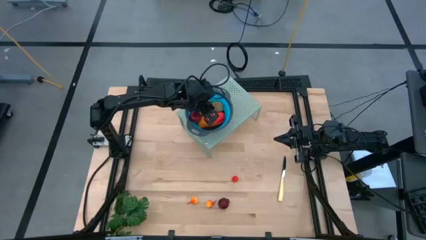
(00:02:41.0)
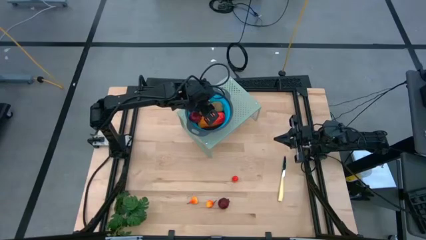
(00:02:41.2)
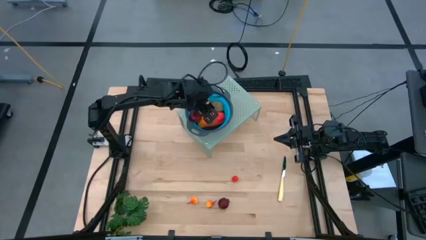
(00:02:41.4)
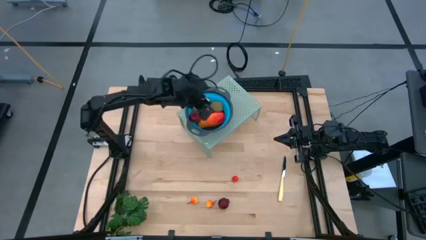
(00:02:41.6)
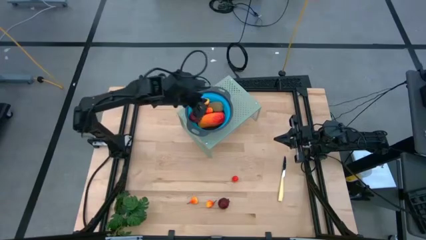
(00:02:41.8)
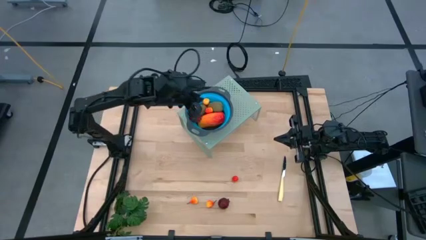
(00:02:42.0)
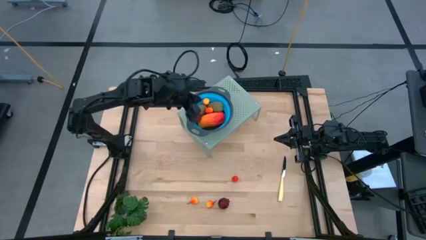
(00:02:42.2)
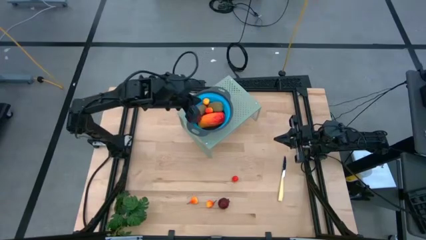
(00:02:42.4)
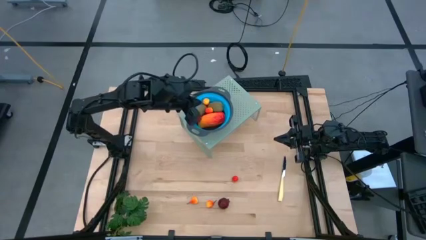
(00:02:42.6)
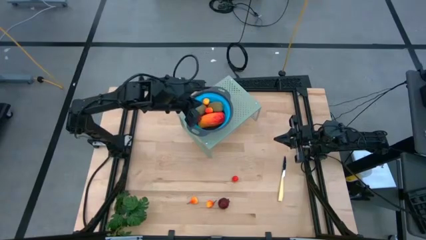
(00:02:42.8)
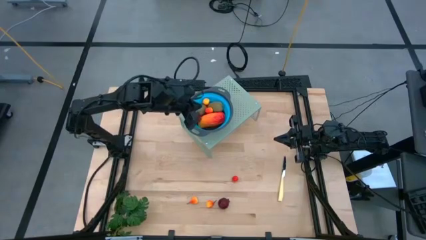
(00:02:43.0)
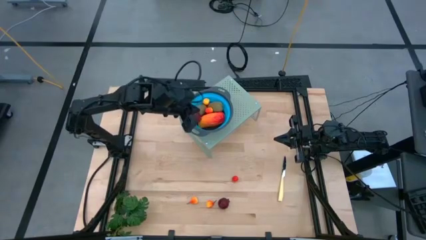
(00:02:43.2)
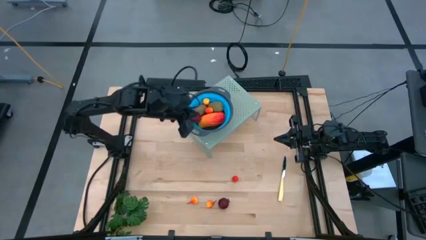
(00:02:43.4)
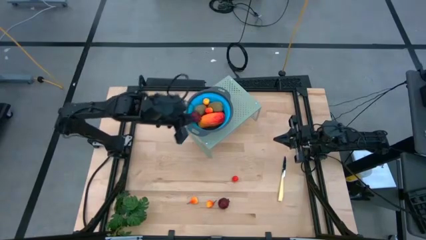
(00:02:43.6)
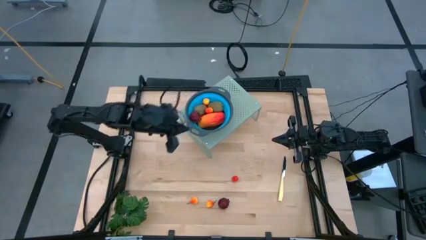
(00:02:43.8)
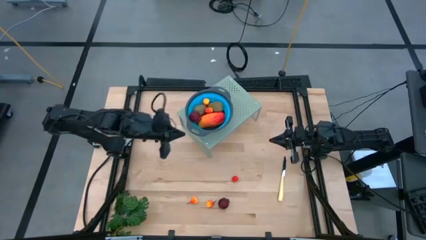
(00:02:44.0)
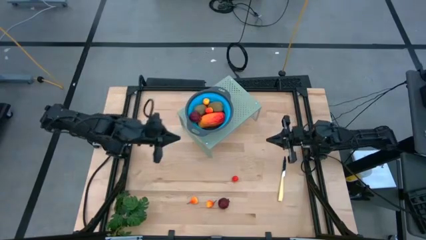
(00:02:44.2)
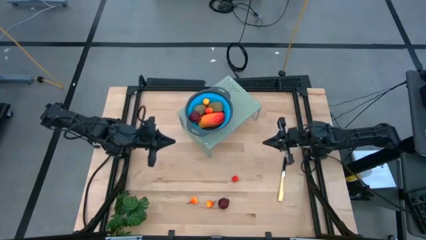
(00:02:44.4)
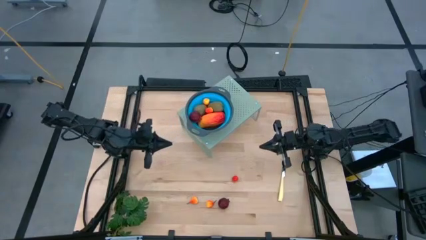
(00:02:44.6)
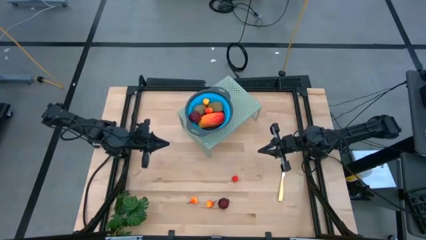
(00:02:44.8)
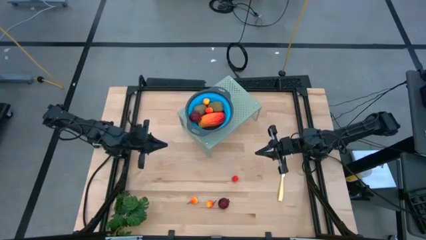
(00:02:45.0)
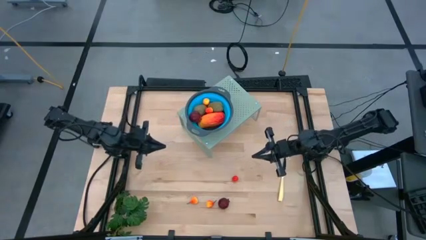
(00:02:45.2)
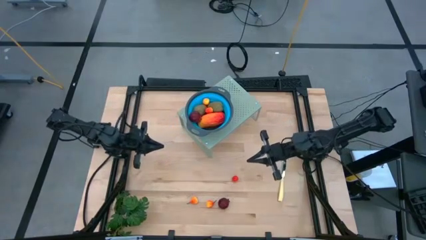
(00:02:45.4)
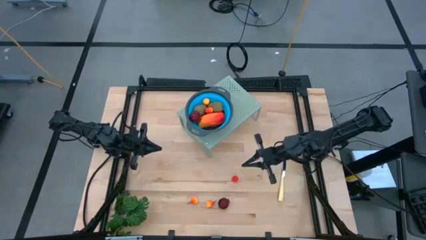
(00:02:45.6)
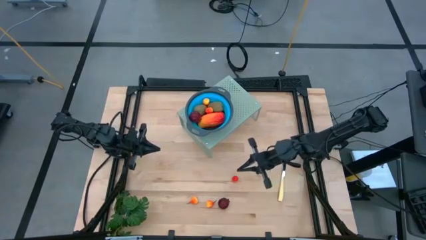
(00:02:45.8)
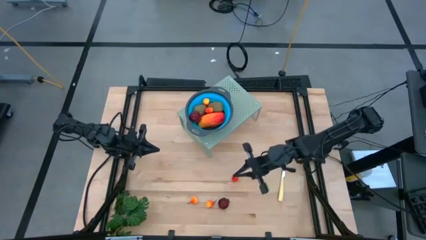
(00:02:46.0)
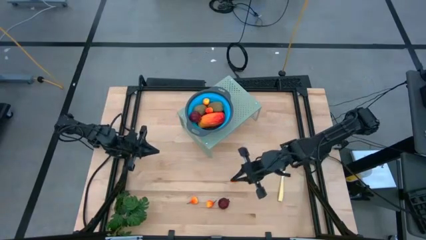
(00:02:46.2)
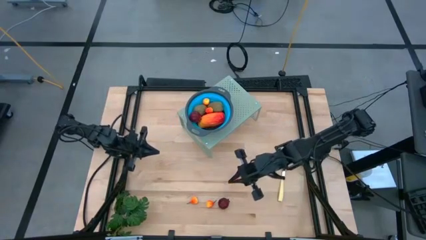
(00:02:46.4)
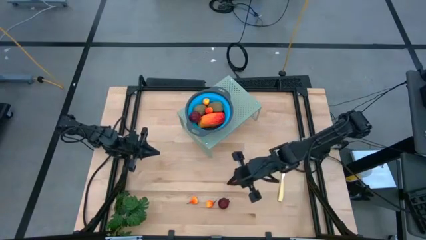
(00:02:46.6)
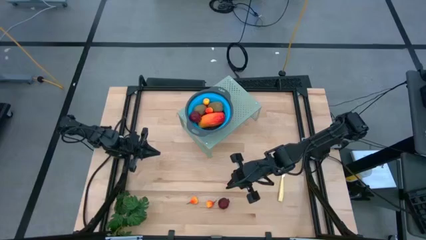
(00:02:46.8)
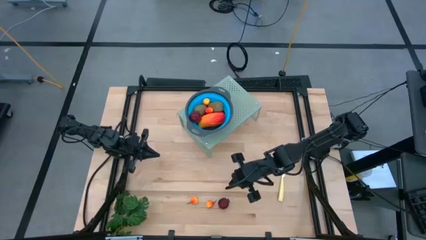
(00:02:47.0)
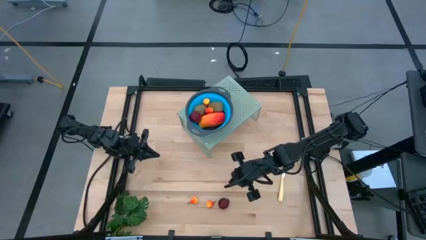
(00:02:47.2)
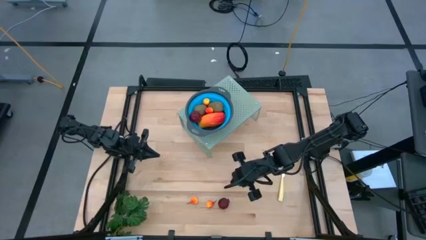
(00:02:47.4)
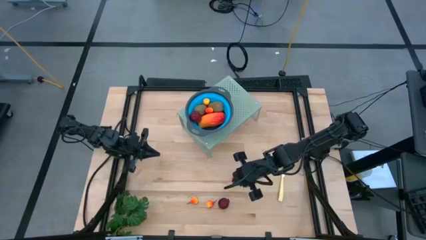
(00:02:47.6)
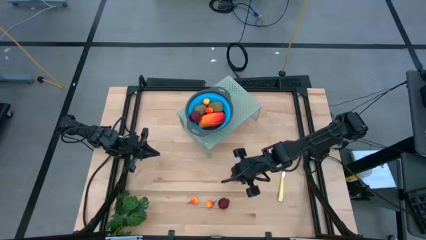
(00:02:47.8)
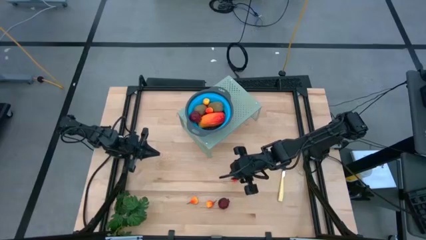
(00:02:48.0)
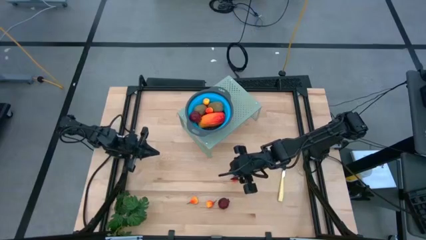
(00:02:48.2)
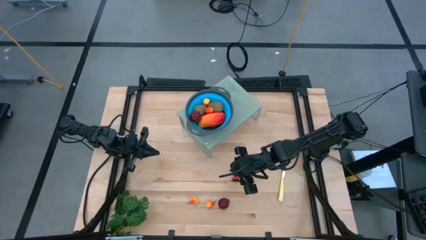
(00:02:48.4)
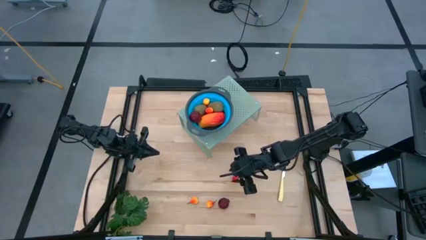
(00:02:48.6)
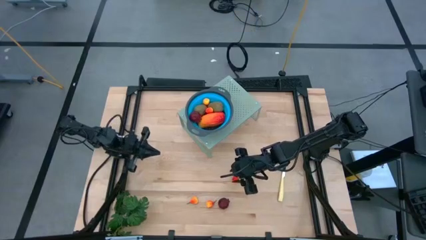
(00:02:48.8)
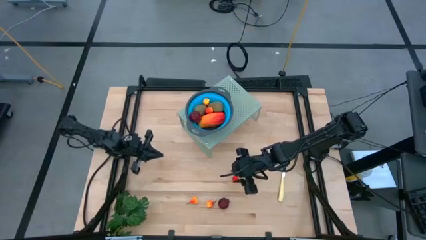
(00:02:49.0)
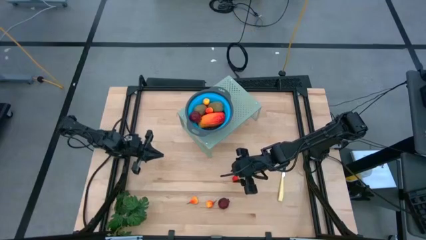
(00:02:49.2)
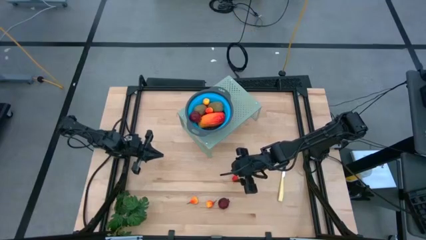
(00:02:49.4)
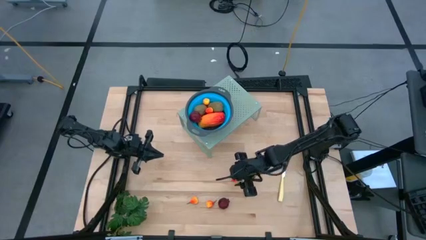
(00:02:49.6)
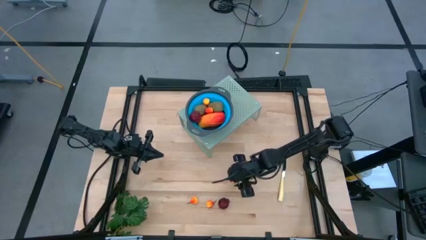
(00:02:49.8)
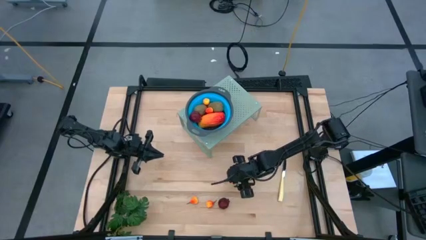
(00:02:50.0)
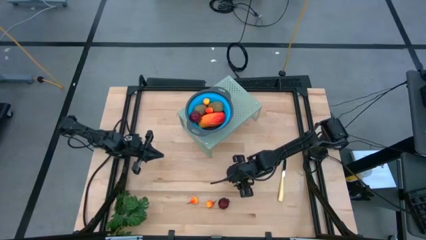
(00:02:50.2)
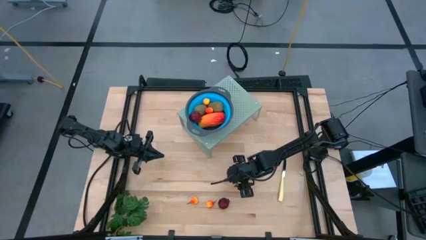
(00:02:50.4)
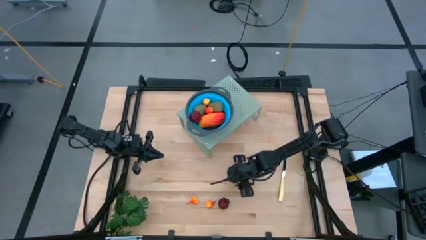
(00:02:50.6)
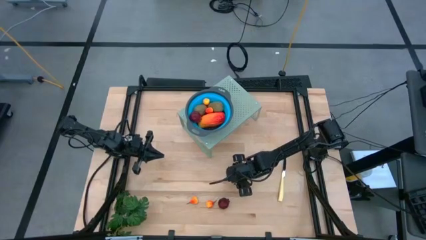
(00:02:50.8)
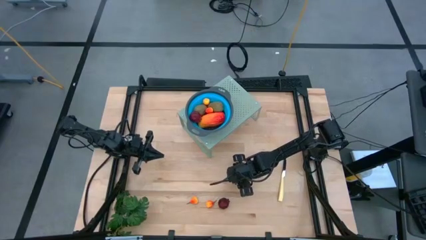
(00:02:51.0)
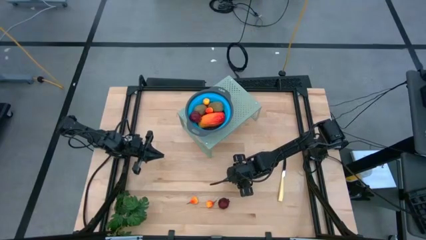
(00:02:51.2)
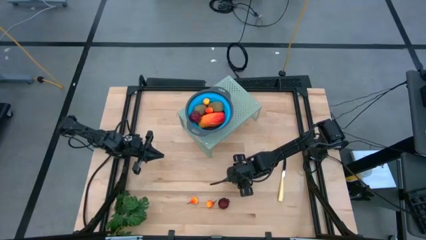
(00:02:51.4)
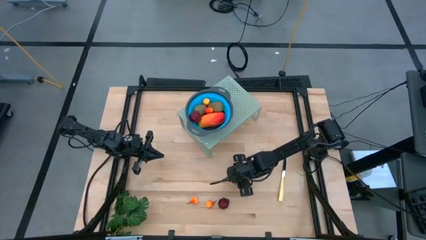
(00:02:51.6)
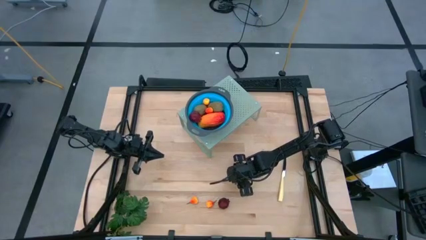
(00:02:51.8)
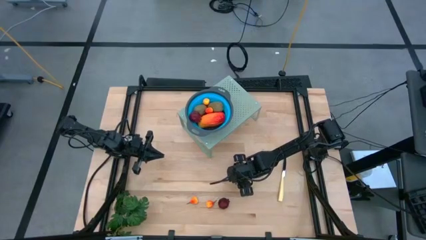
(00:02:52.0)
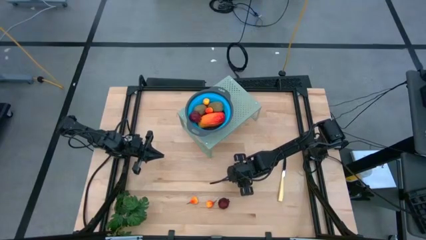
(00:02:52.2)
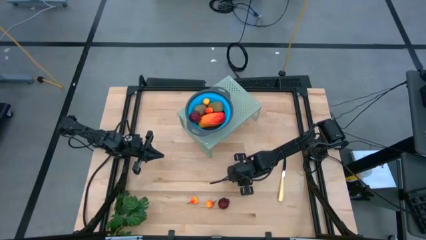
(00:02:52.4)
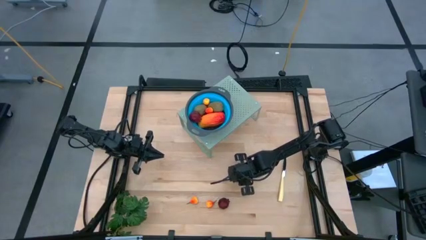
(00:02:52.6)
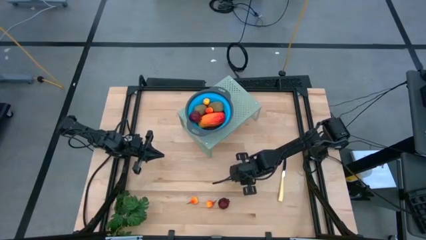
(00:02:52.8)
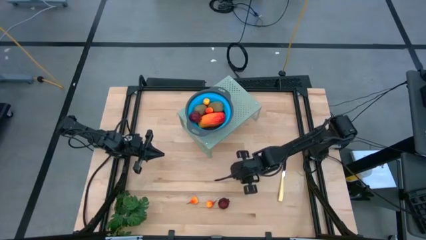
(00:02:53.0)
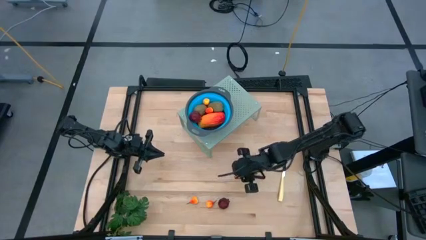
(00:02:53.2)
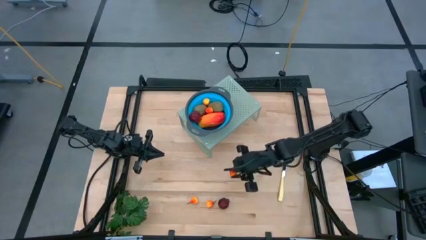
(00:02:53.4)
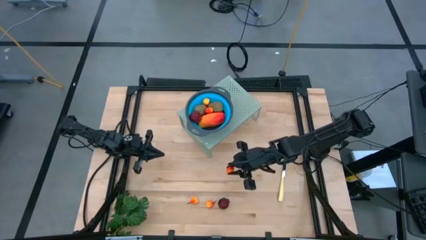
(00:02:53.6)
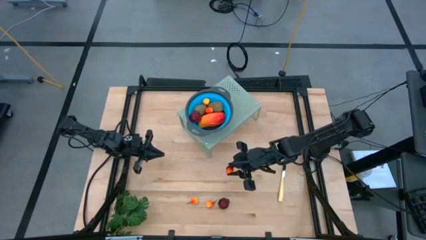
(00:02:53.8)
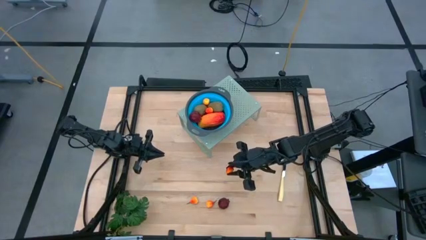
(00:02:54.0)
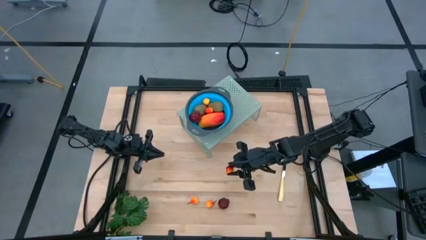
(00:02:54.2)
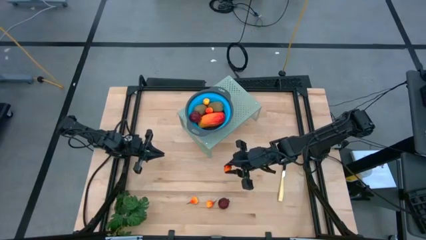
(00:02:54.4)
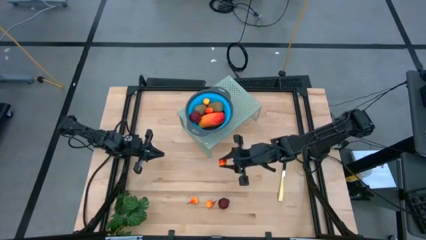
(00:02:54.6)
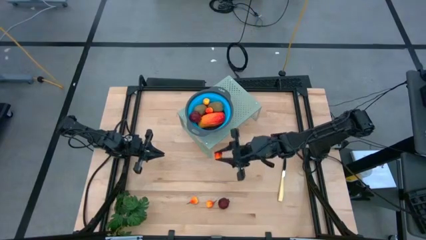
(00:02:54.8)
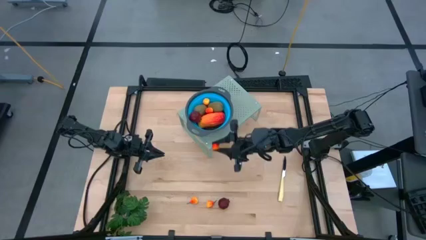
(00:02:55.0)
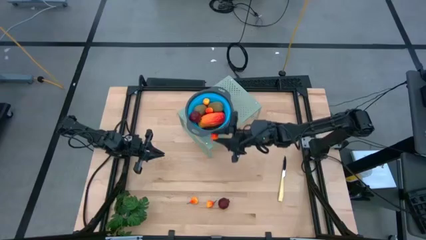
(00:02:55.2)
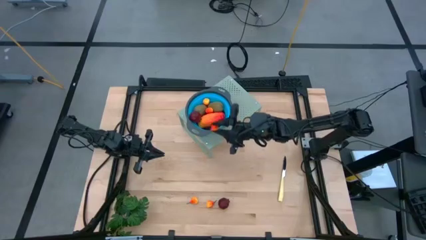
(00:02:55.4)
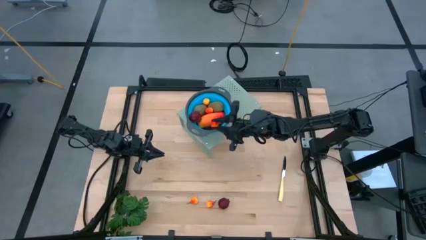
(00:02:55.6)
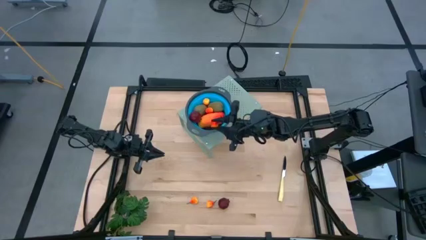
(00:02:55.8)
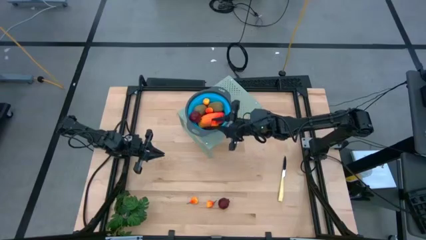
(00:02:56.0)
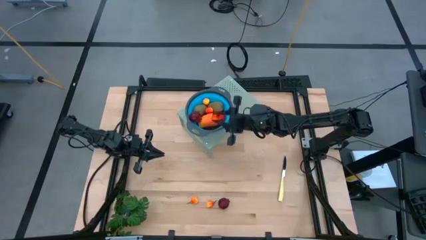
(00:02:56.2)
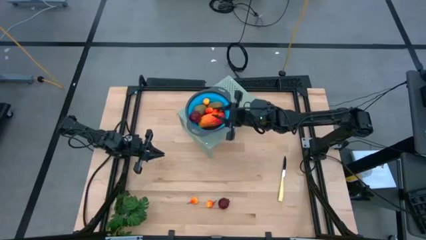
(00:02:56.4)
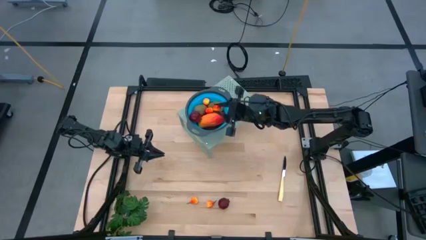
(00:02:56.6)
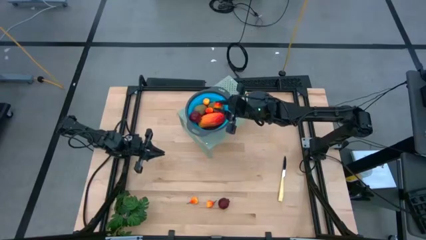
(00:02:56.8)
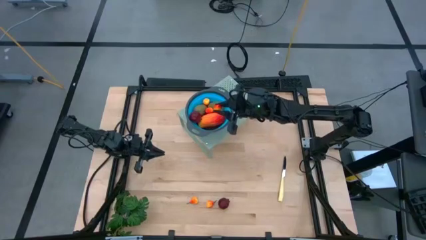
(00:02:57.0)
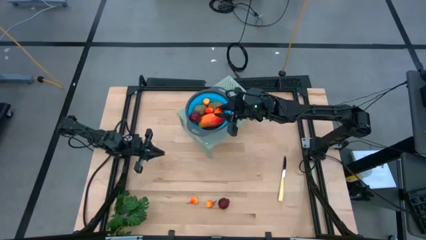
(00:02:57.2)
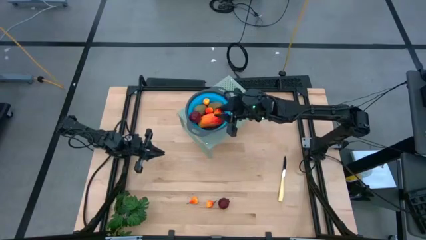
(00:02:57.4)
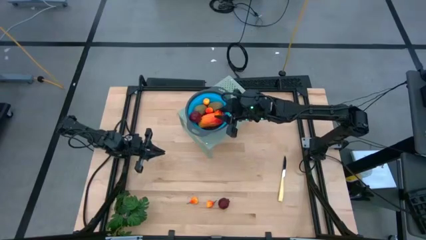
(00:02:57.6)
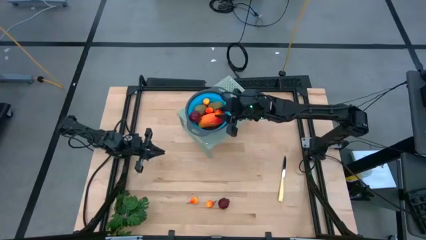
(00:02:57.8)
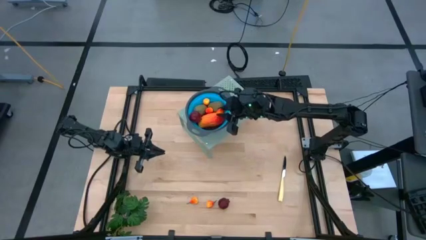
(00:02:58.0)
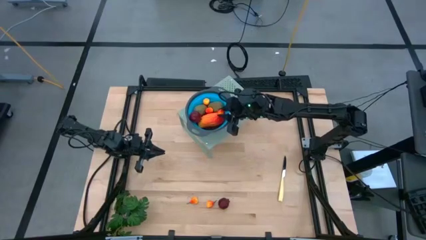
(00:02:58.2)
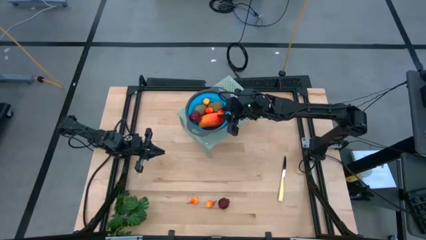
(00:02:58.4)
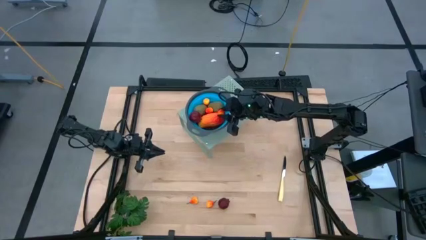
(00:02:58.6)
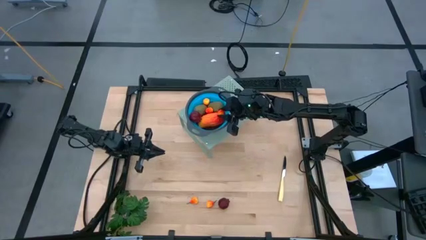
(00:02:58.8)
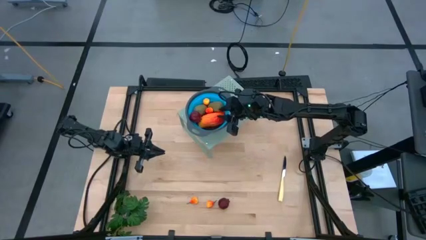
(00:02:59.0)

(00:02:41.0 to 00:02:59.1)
Task: Pick & Place Fruit
Put the red yellow peach into the blue strainer bowl on the shelf
